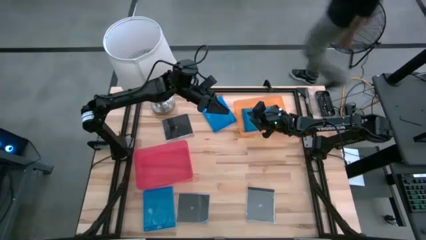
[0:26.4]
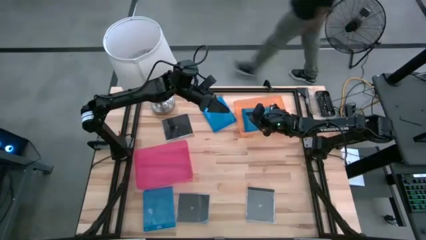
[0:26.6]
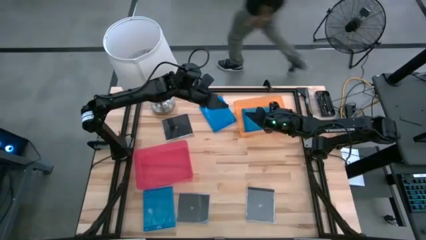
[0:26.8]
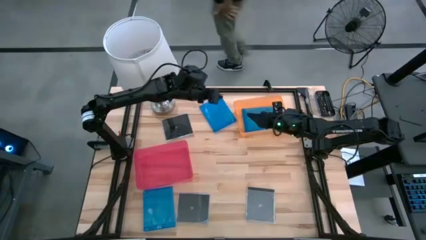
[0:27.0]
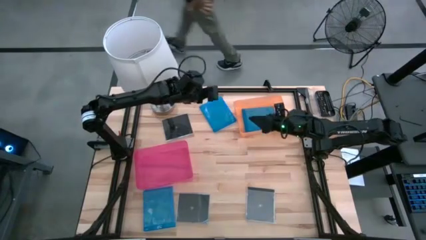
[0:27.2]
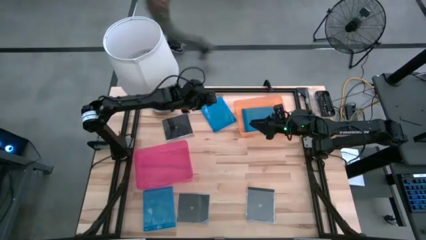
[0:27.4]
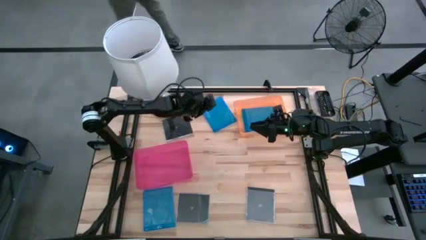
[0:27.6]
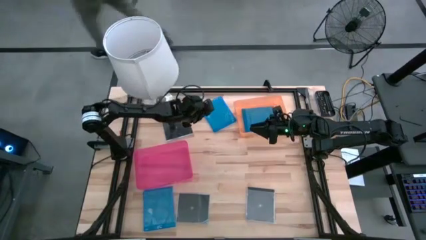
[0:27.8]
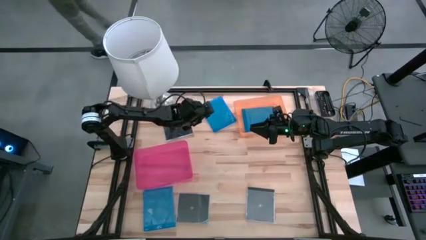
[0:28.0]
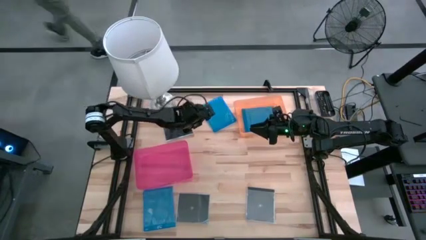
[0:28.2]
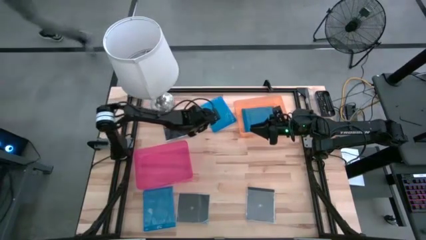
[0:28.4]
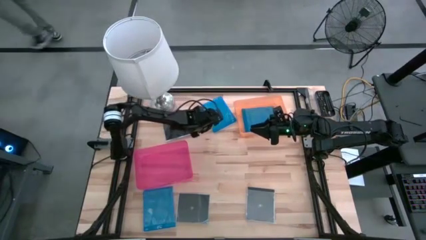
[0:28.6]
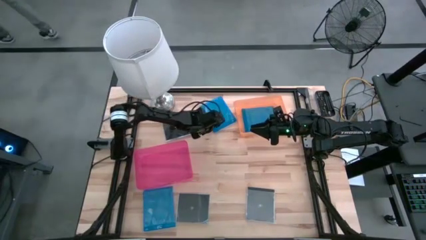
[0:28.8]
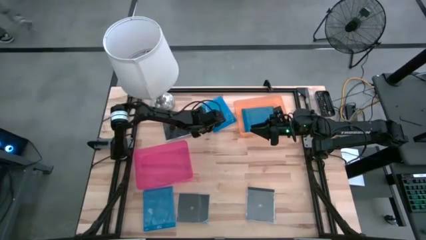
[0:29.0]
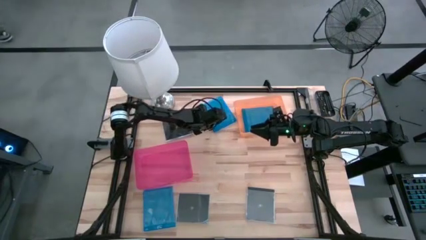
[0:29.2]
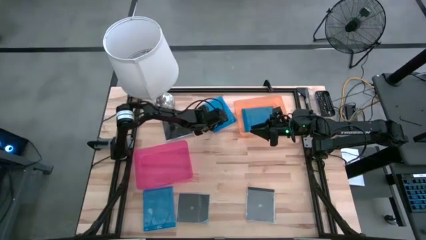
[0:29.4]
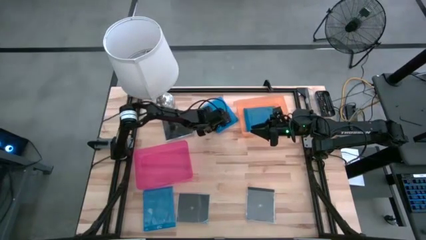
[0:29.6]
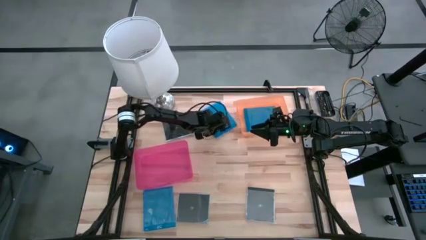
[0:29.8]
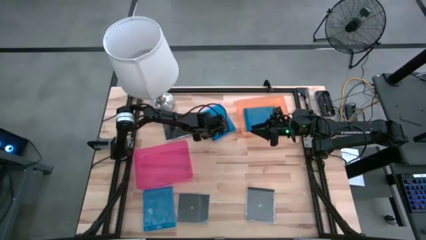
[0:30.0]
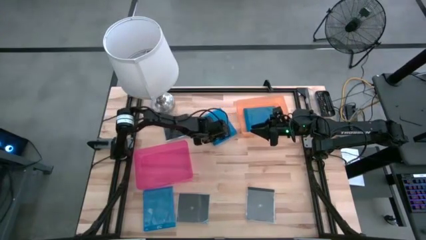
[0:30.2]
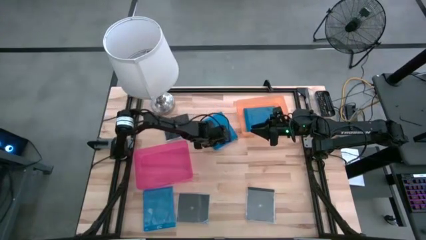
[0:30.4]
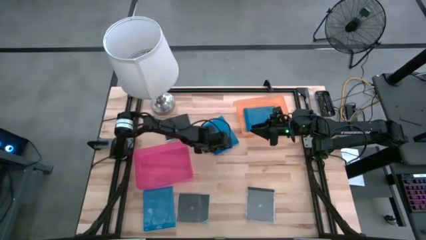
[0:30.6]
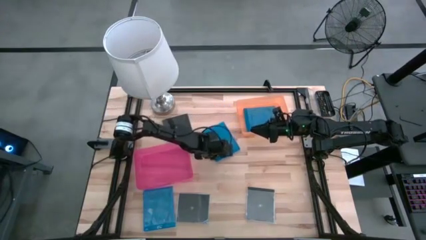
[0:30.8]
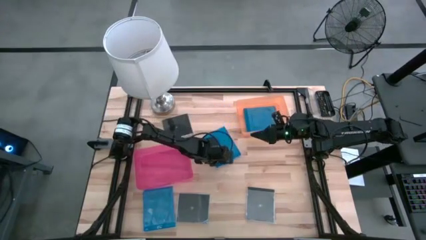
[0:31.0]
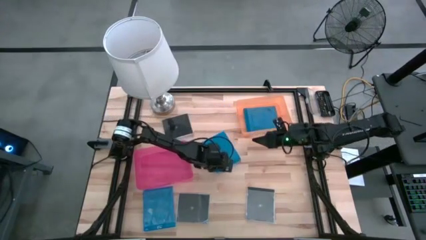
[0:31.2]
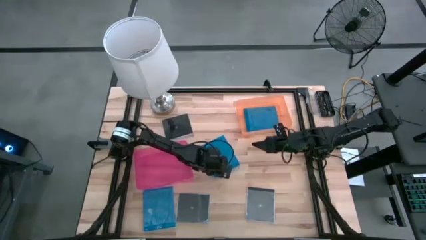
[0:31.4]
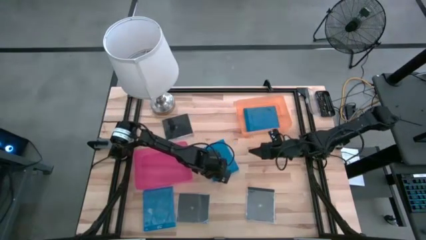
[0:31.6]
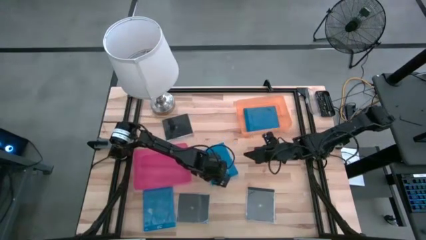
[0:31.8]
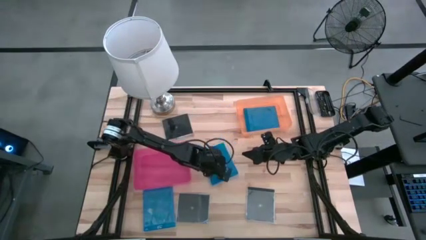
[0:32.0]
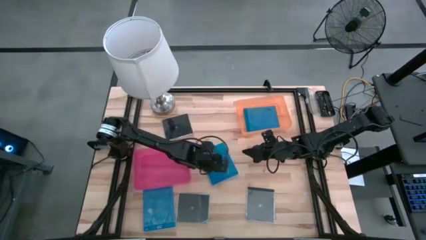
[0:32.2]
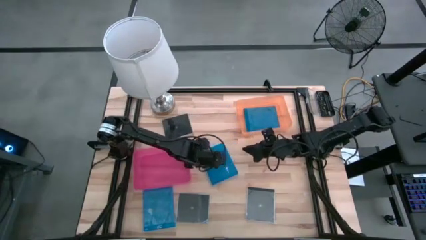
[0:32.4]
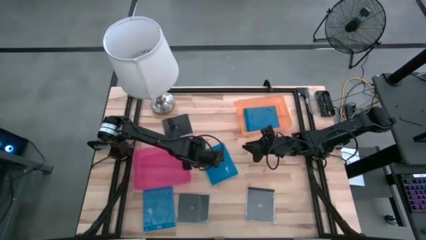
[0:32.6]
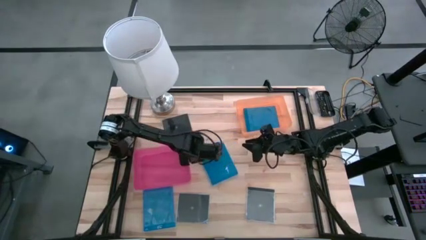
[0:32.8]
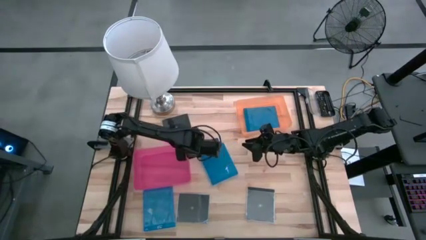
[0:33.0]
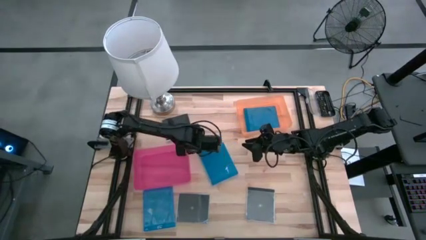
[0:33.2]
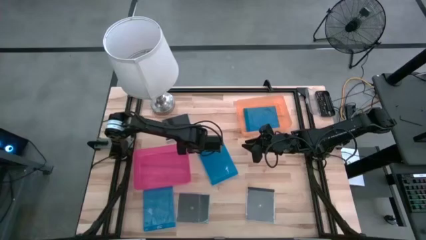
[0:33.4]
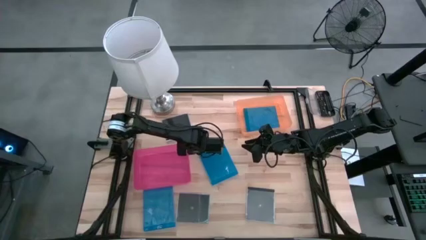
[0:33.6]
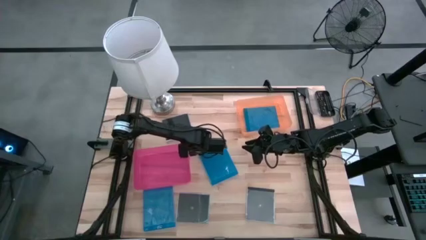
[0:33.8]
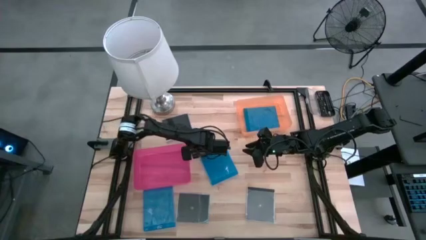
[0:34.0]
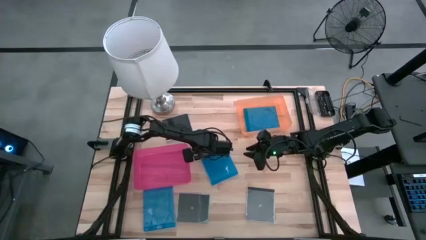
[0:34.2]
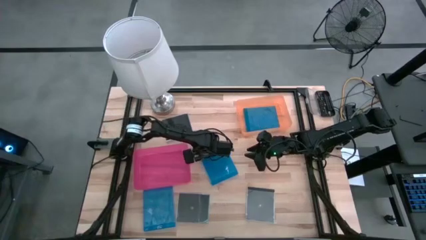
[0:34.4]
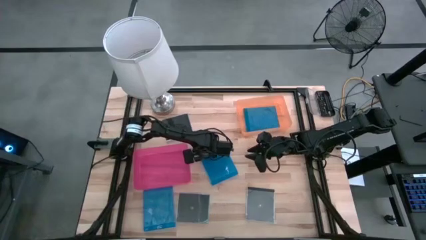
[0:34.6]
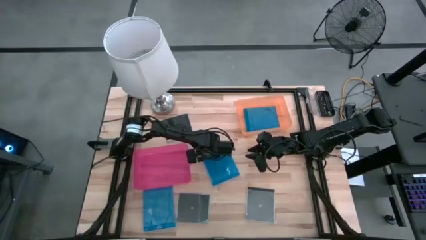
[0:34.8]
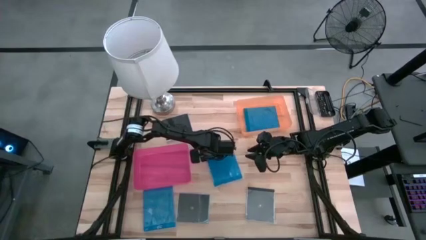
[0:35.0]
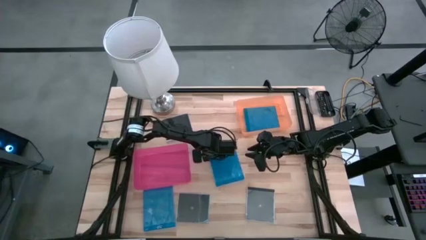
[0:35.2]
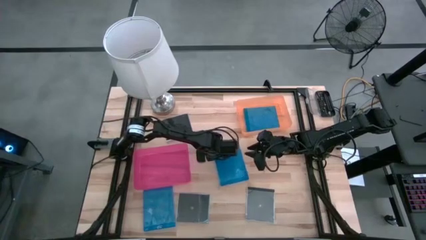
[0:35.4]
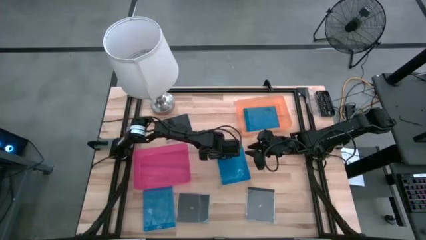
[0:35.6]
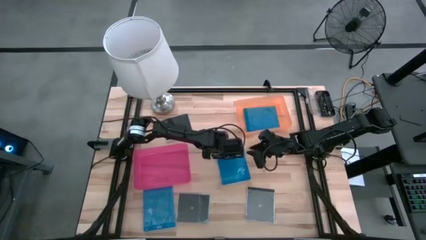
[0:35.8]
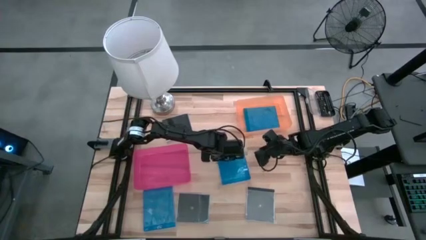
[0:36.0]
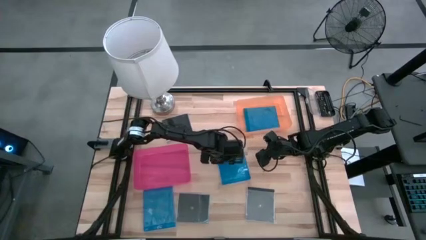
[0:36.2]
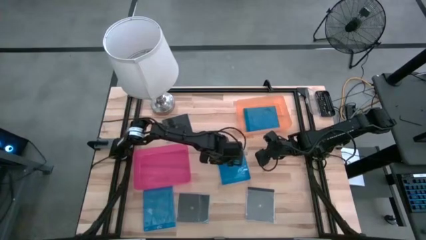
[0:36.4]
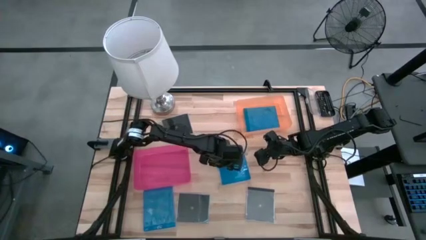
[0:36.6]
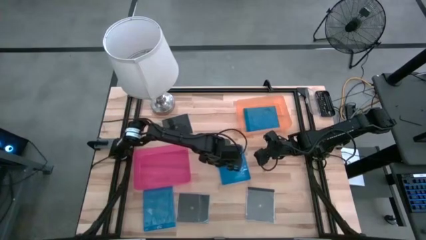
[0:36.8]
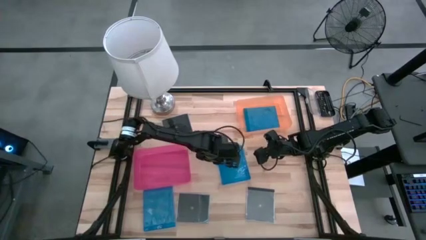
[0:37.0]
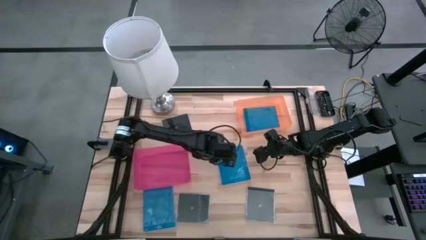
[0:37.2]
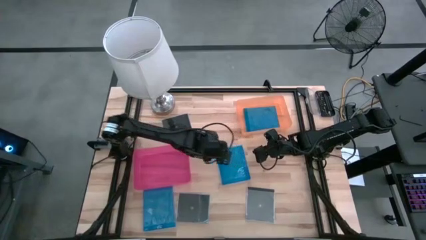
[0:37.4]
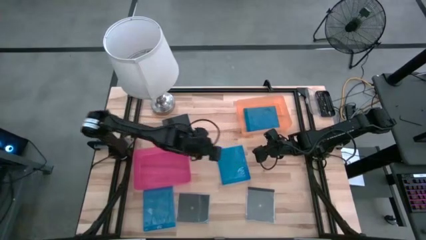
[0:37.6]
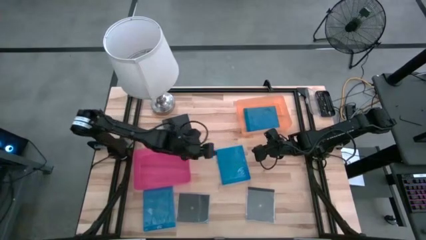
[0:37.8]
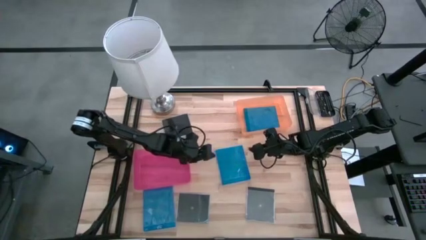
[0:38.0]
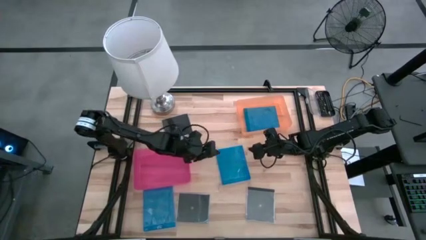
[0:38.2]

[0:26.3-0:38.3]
Task: Pick & place jewel cases by type
Put the top blue CD case into the orange bin
